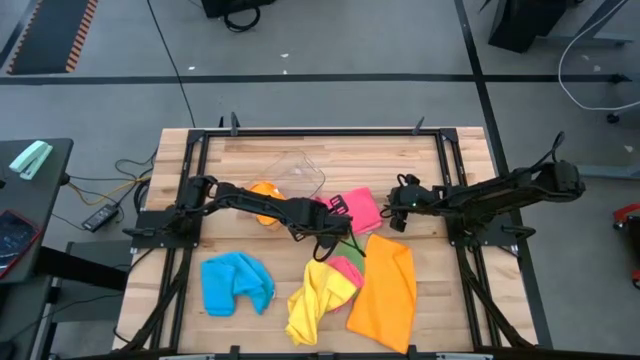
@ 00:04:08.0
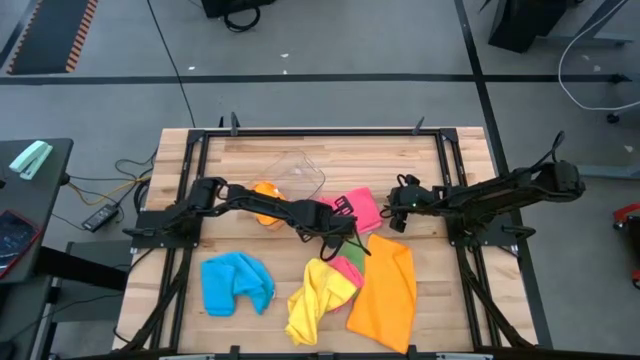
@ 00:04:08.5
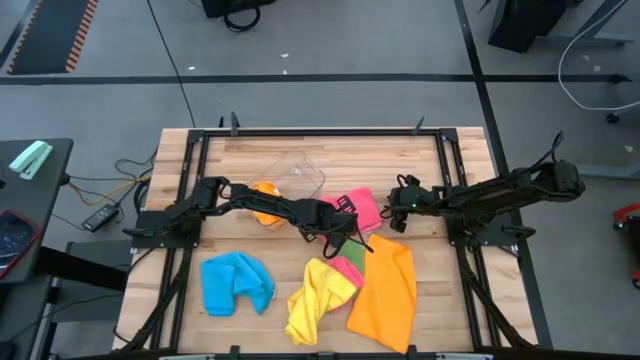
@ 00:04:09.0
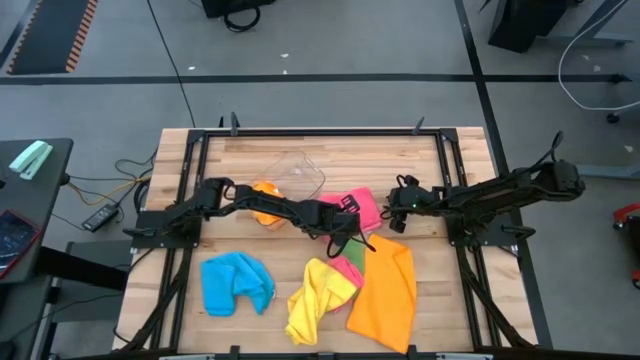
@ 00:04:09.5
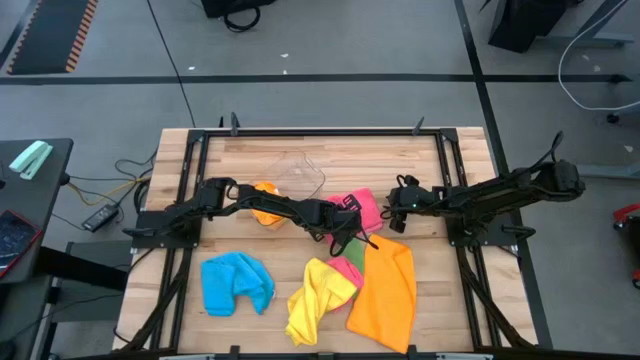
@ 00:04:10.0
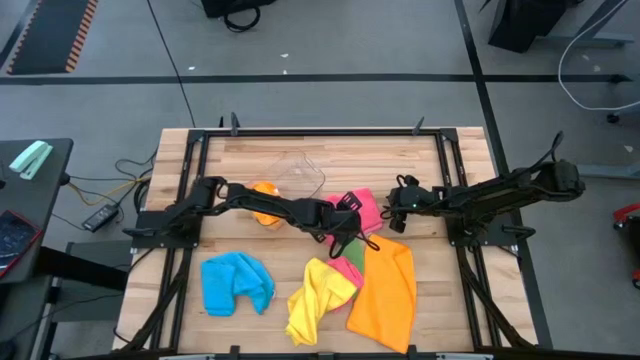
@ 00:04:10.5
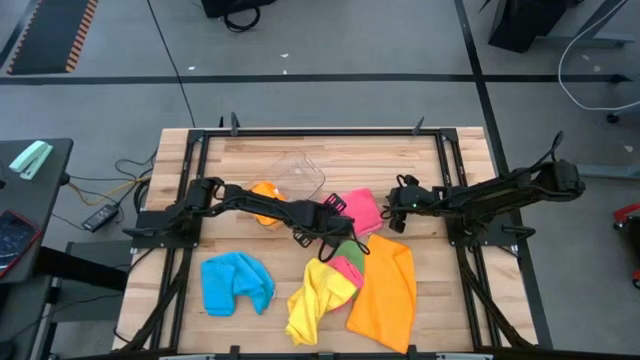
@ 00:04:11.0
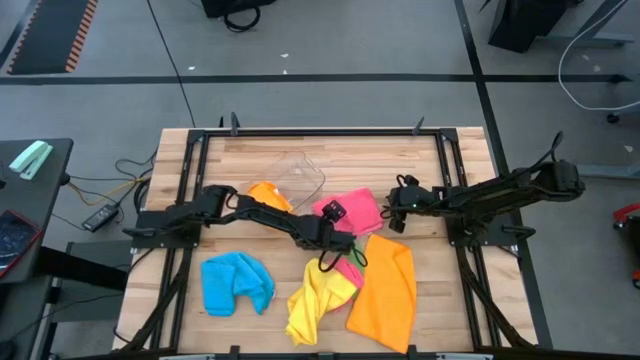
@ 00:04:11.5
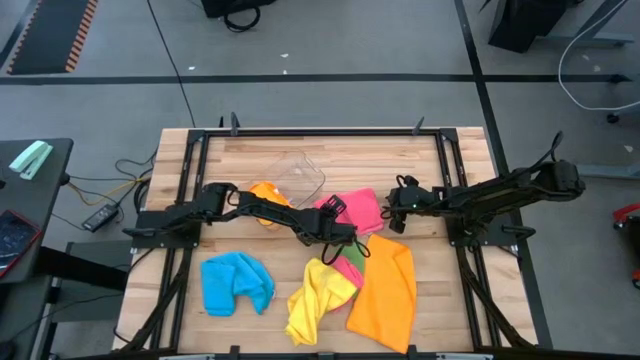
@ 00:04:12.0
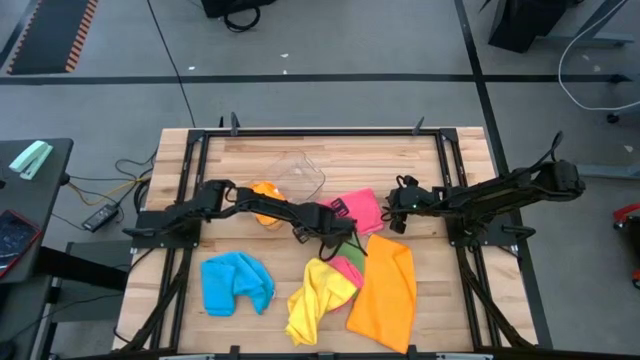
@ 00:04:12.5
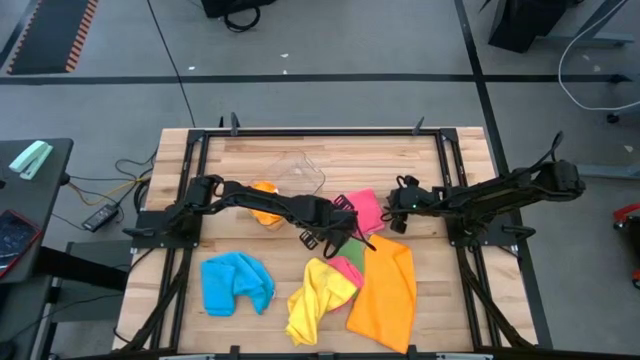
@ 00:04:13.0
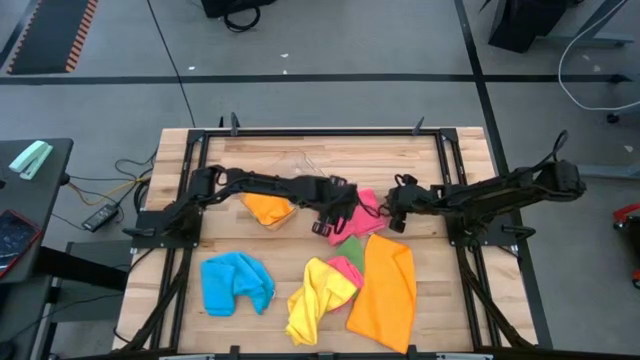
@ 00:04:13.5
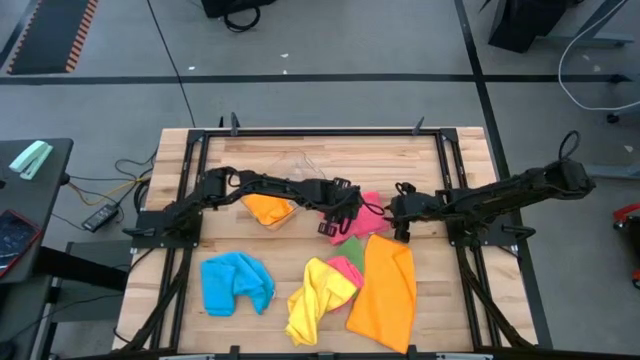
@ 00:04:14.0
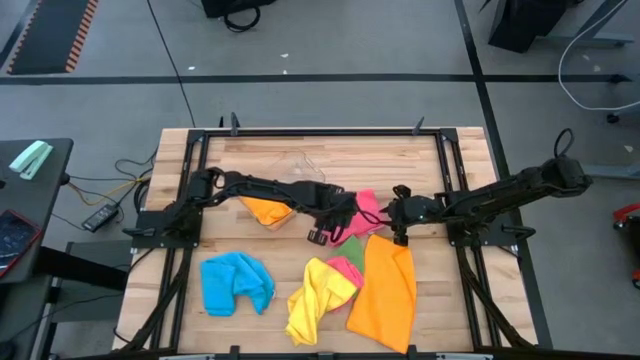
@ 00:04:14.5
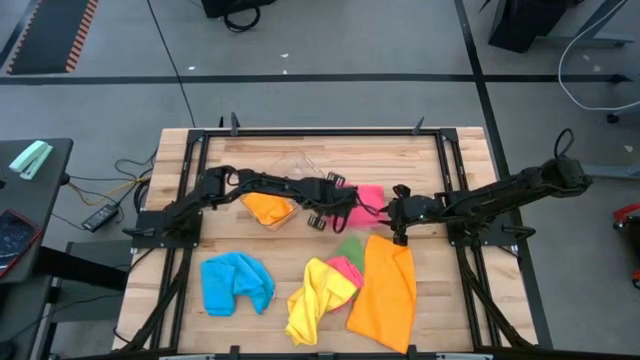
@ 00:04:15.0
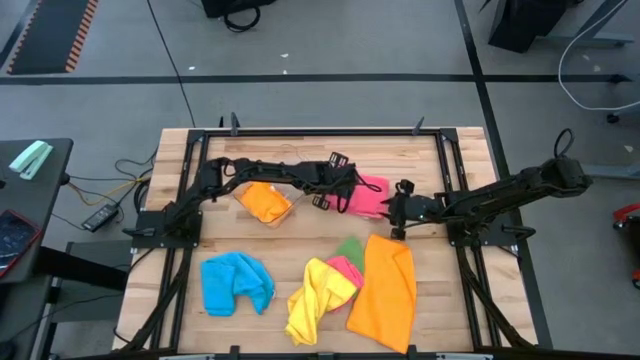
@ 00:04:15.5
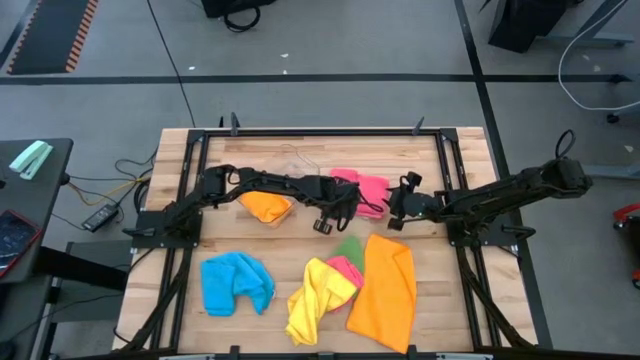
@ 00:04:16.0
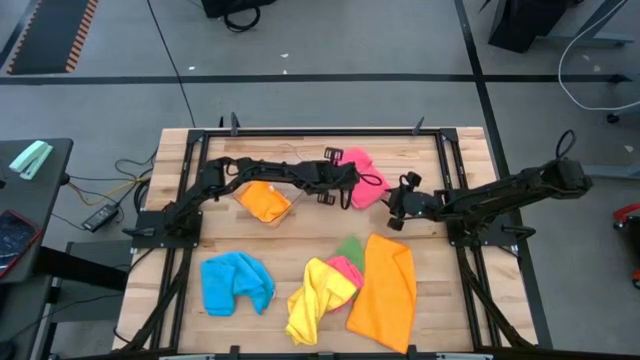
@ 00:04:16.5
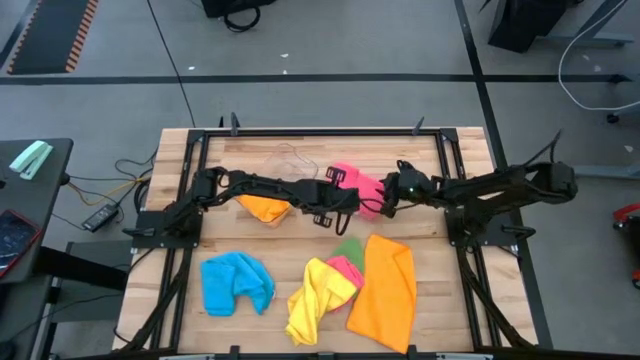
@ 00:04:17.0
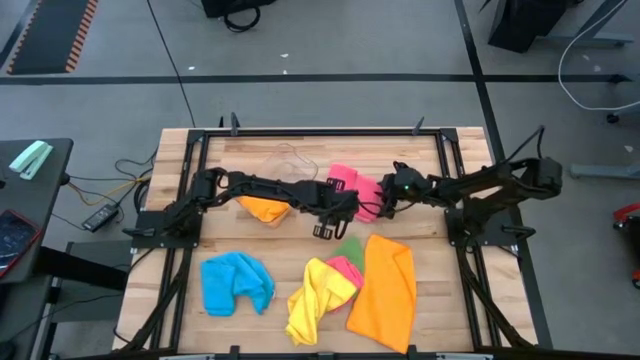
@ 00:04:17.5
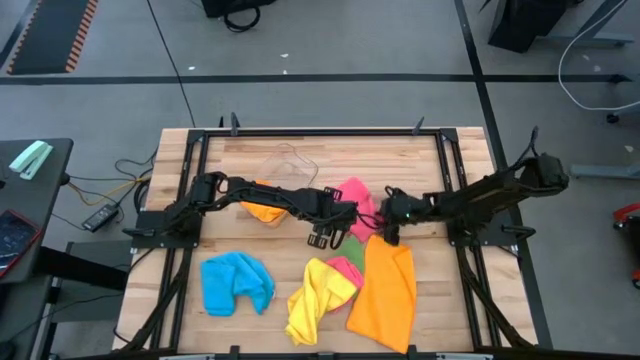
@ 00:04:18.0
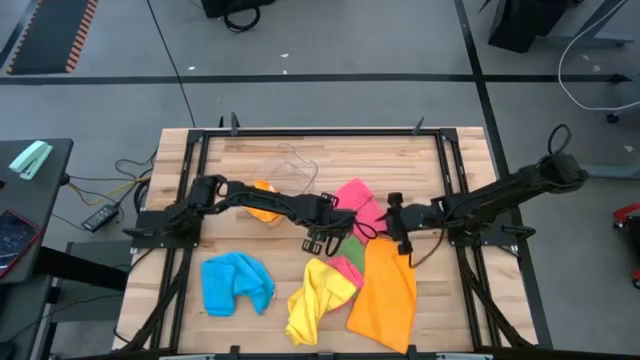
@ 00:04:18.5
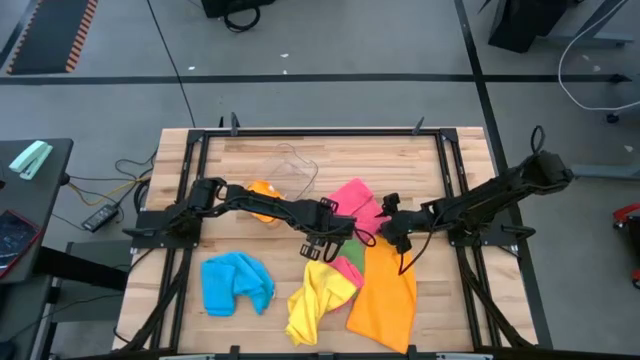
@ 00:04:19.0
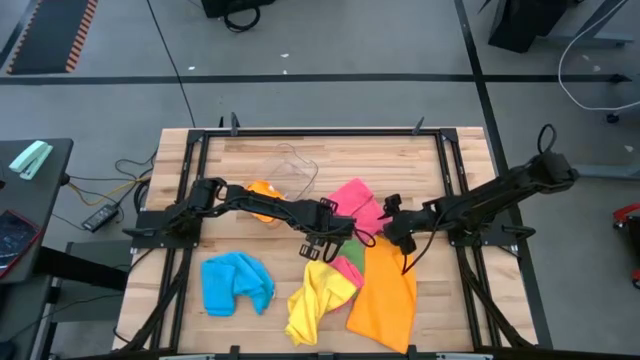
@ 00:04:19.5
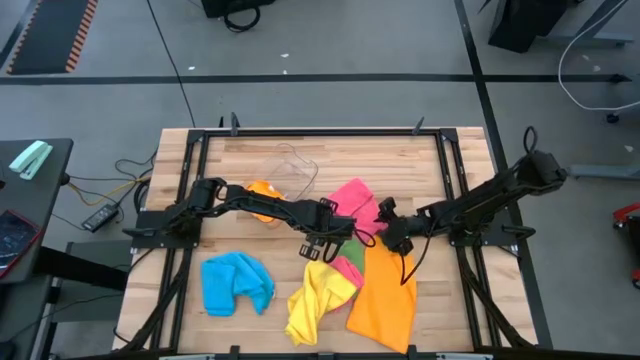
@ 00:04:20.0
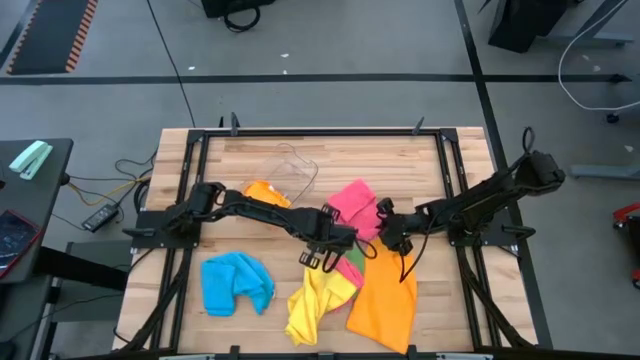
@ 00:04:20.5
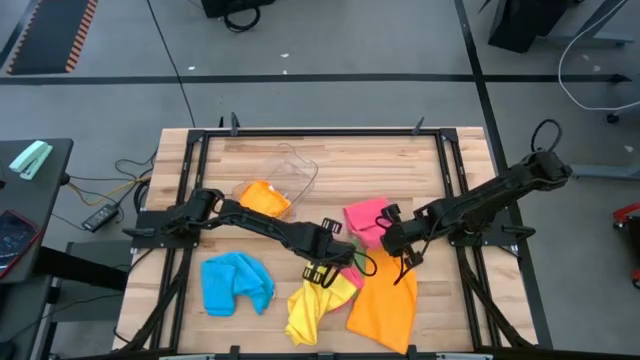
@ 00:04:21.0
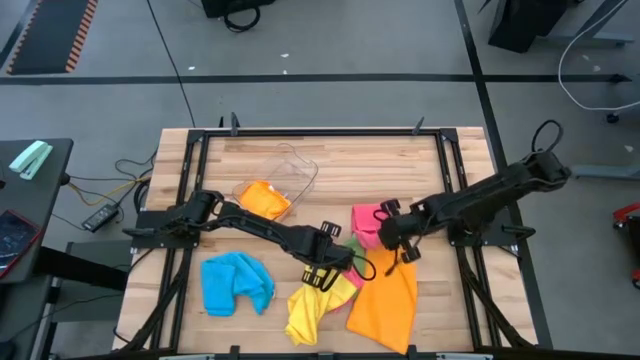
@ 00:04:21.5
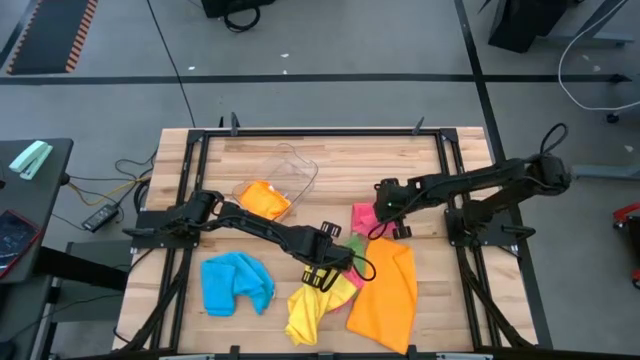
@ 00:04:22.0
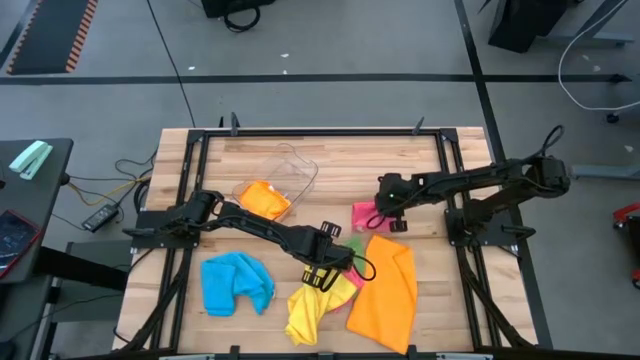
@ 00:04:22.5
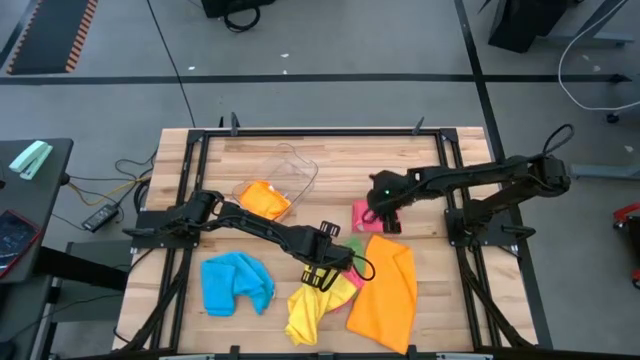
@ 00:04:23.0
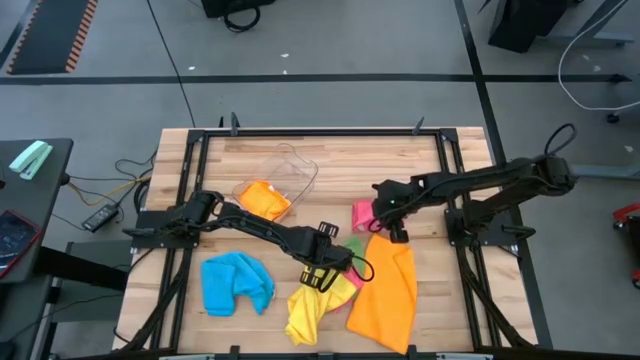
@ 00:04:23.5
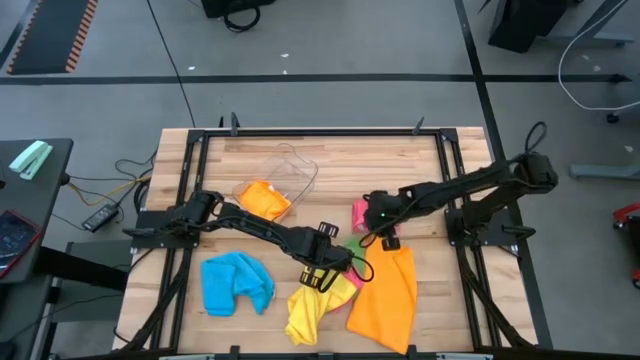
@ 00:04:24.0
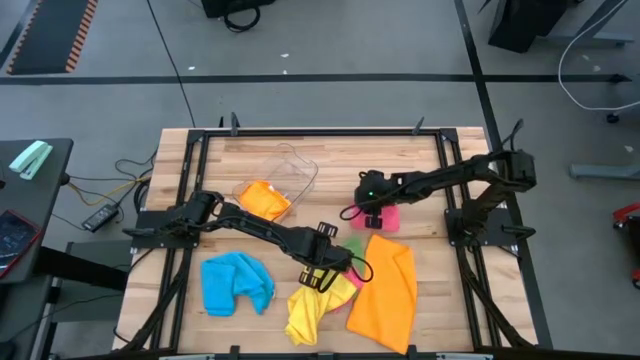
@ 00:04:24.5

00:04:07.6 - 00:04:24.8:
Task: Fold microfiber towels
Fold the pink microfiber towel
